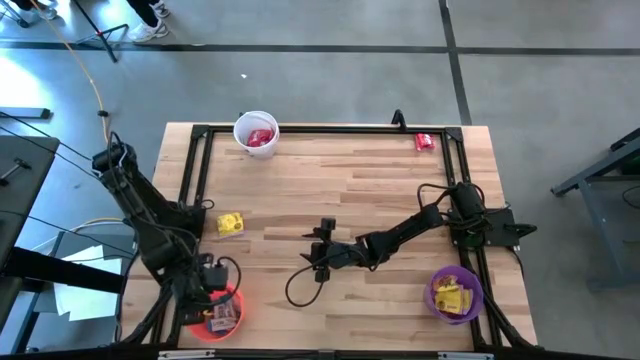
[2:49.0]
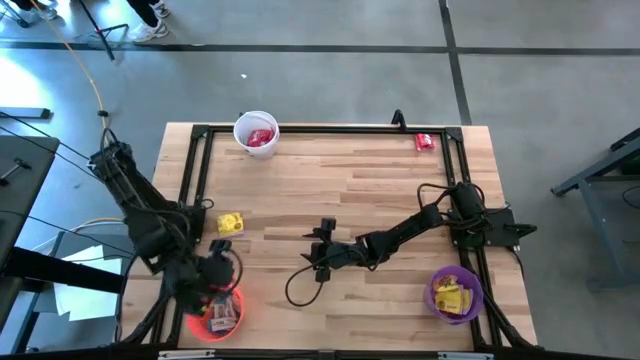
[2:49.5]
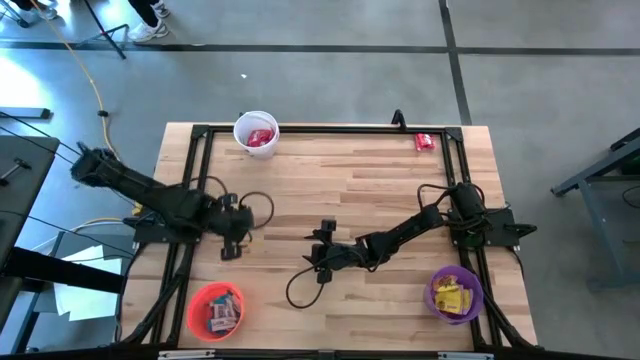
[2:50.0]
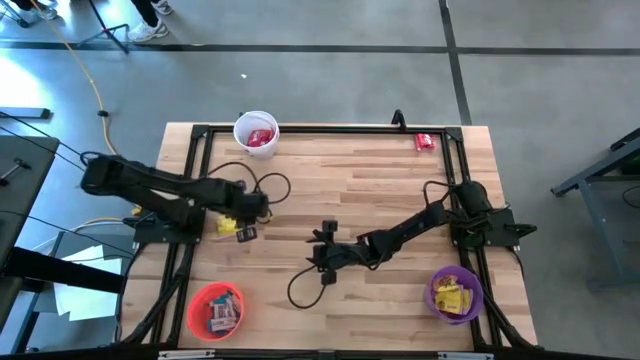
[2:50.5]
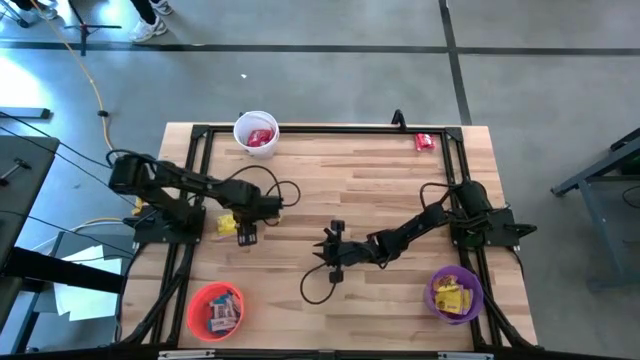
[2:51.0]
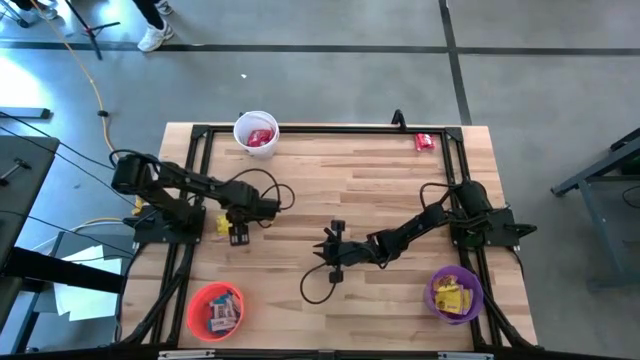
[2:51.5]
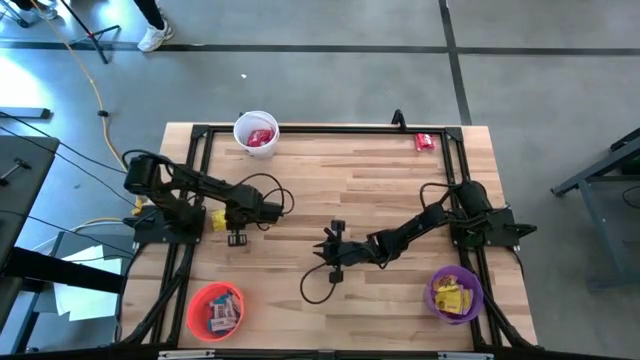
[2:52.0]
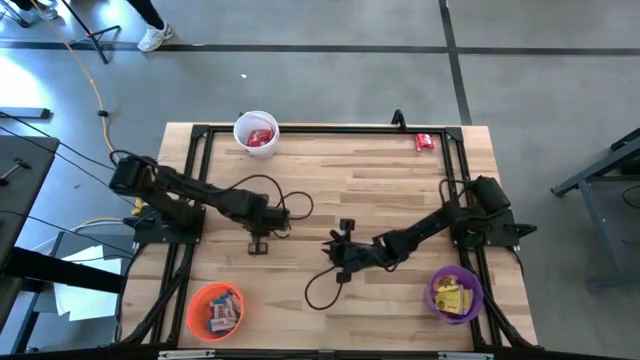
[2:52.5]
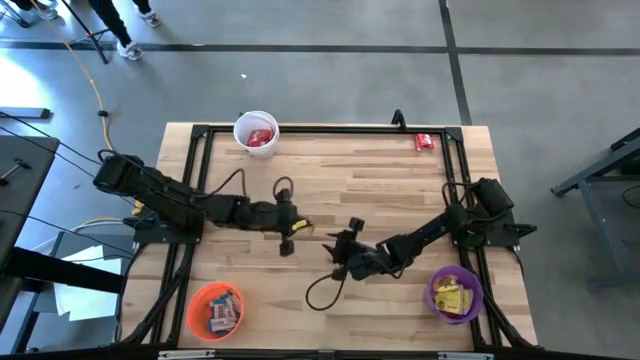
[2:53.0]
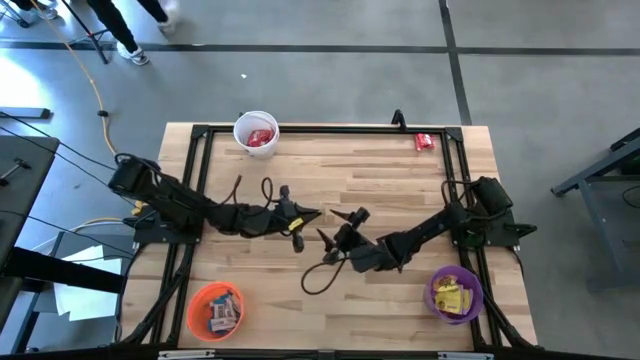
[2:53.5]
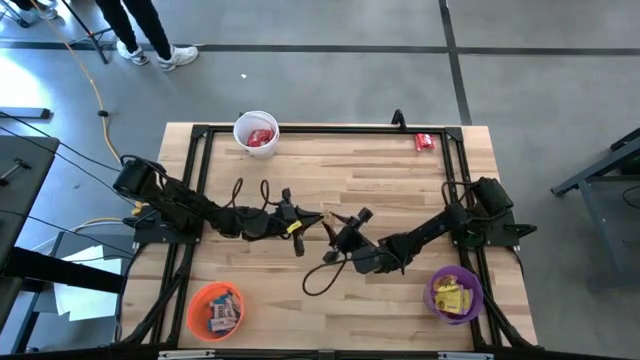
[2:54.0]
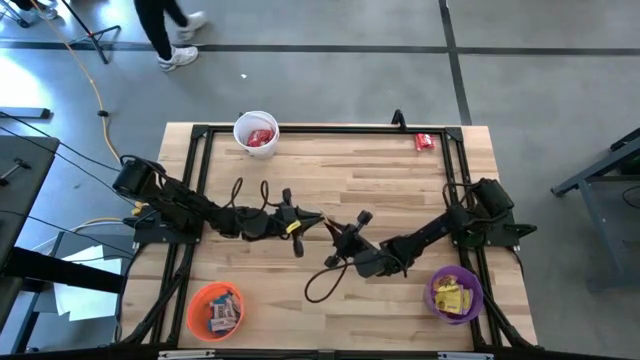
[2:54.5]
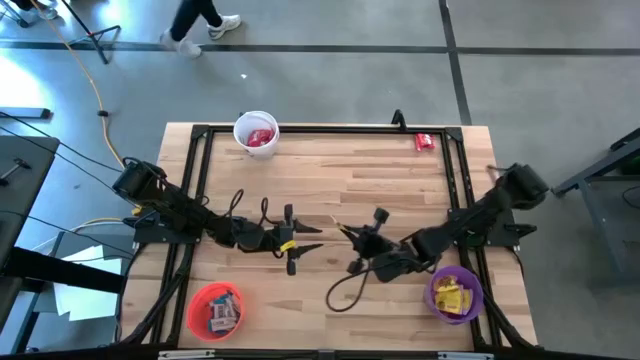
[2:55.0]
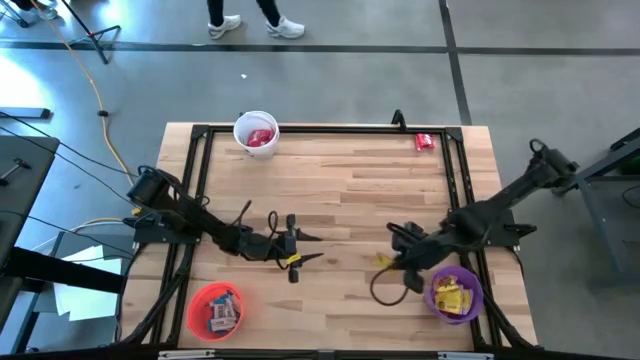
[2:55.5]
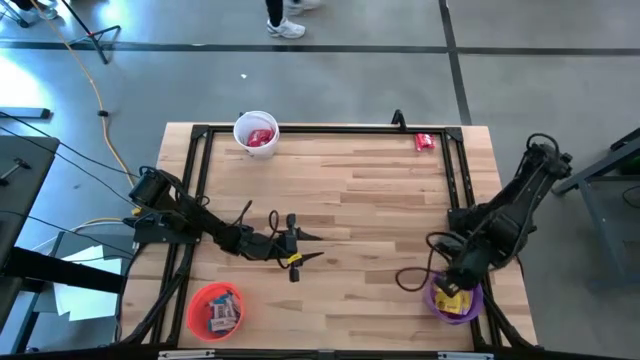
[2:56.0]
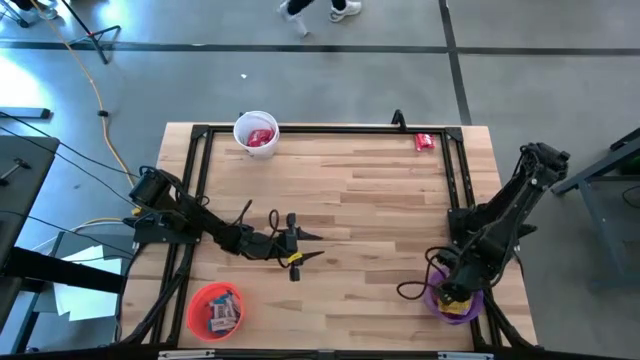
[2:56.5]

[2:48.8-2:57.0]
Task: Sort candy
Put the yellow candy into the purple bucket

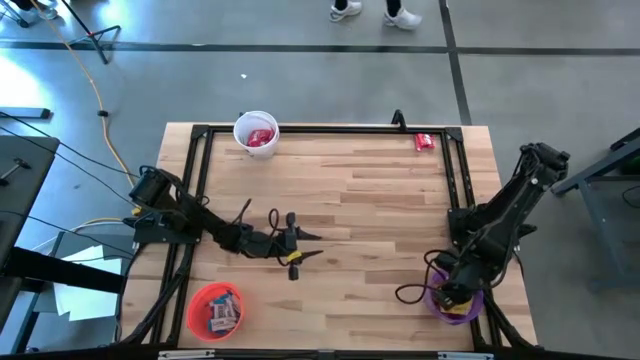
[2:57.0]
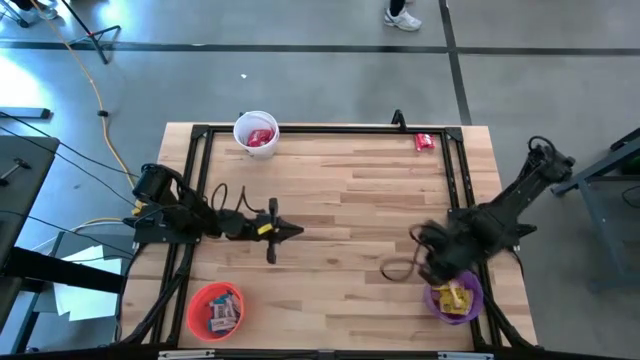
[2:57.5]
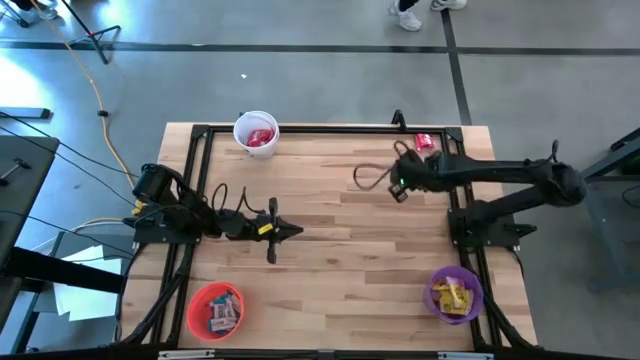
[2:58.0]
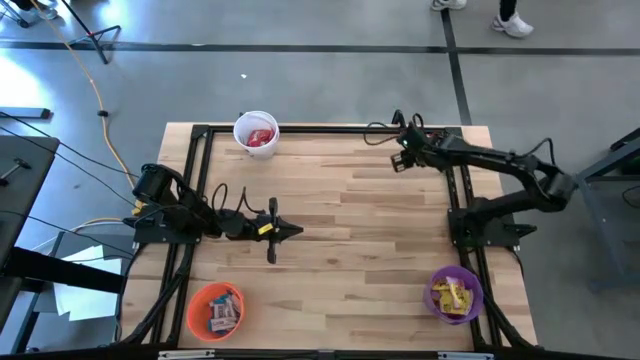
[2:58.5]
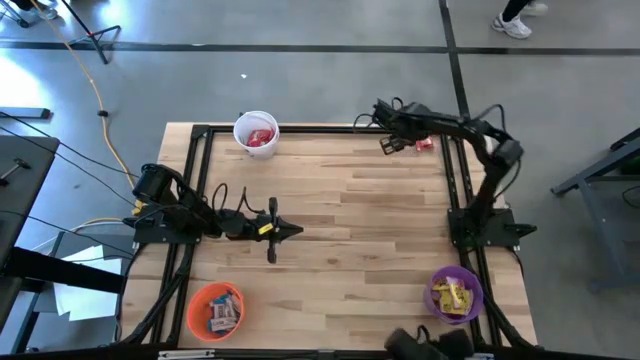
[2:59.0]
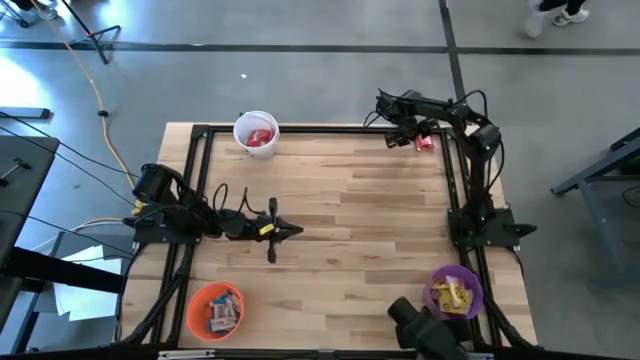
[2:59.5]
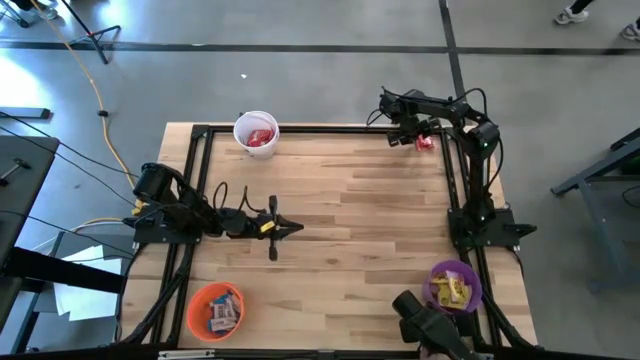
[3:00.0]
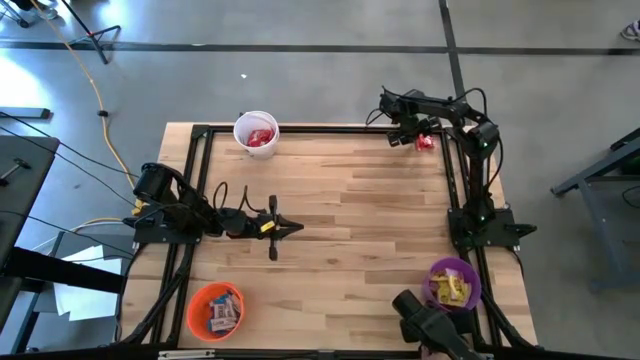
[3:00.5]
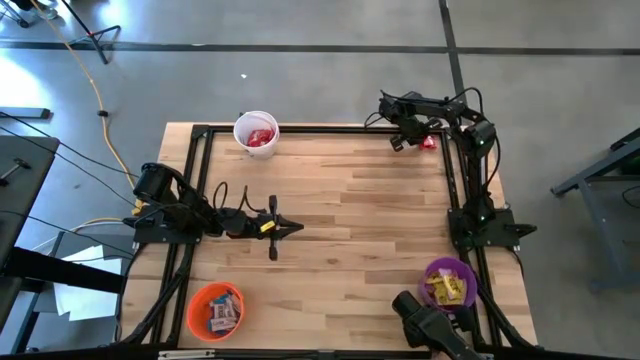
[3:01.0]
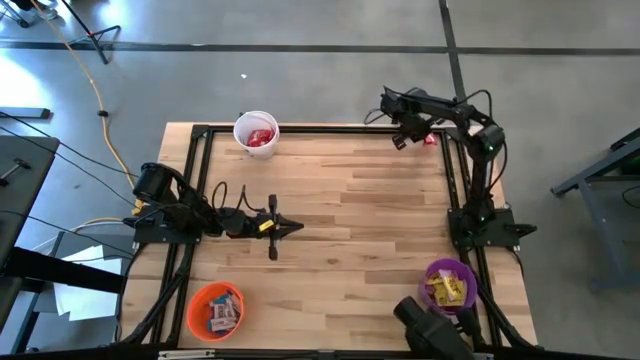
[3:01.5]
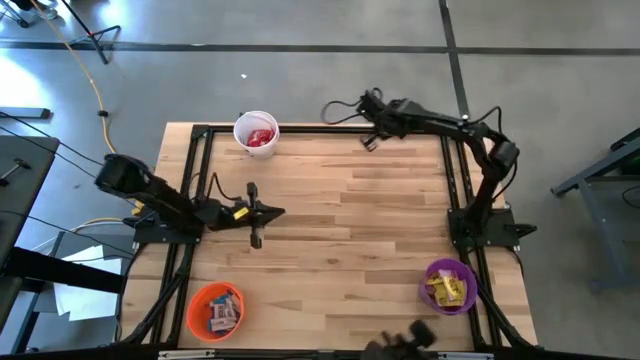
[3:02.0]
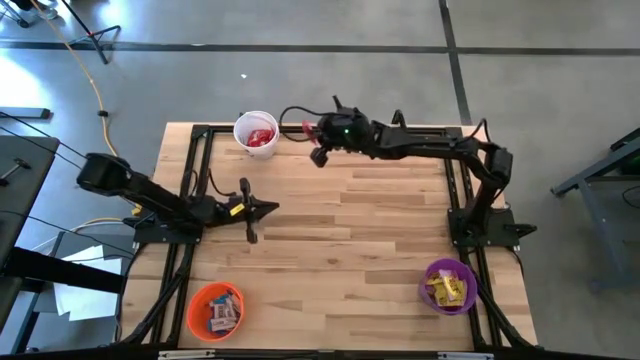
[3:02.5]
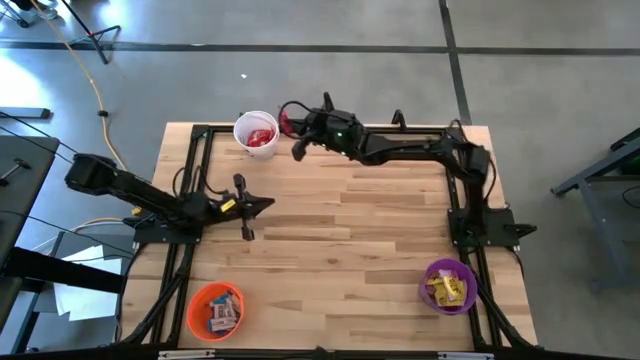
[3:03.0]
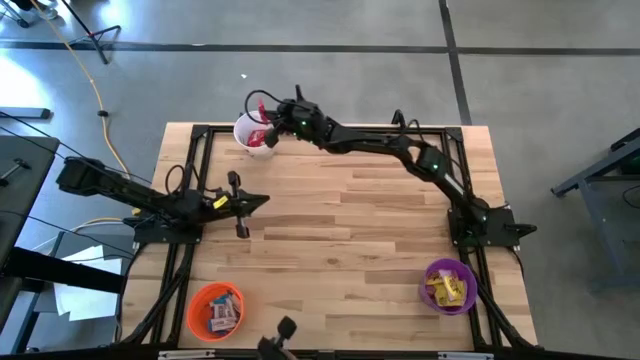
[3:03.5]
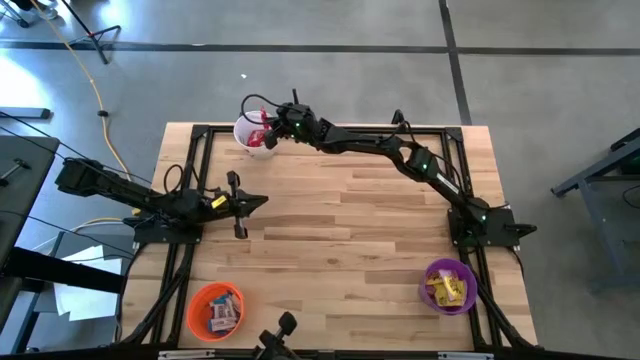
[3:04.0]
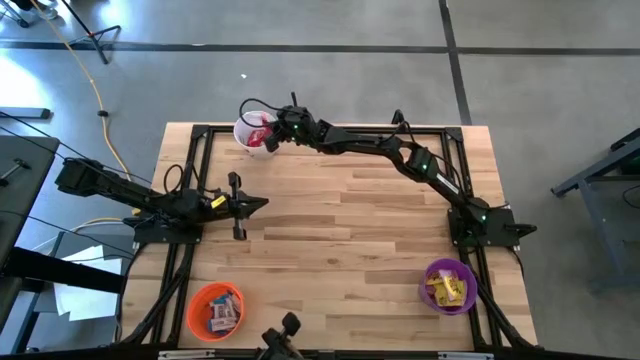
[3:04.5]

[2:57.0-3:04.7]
Put the red candy into the white bucket

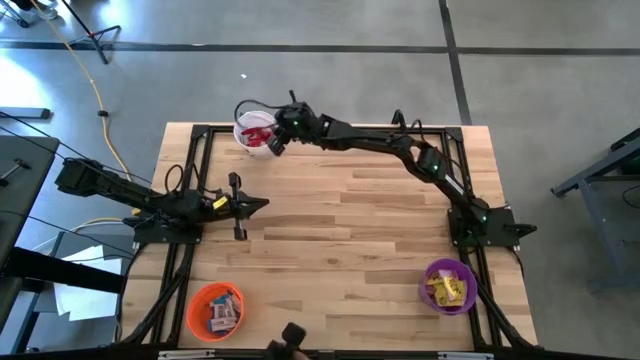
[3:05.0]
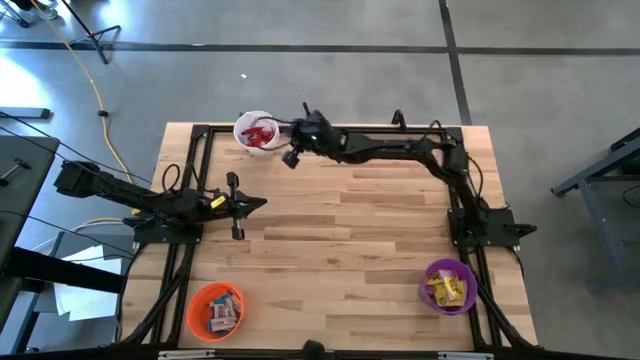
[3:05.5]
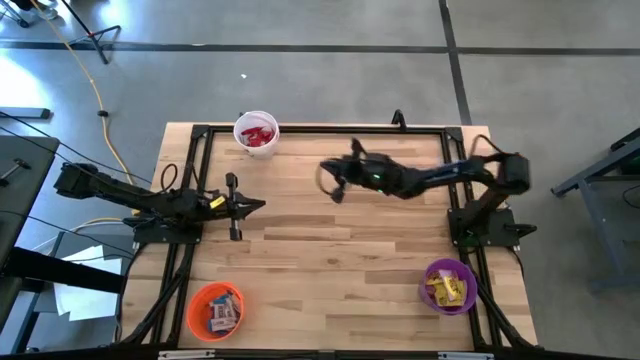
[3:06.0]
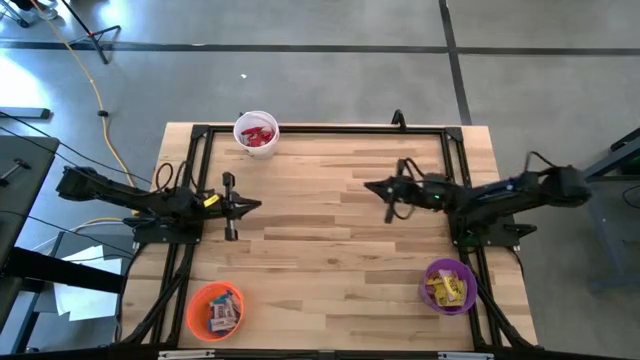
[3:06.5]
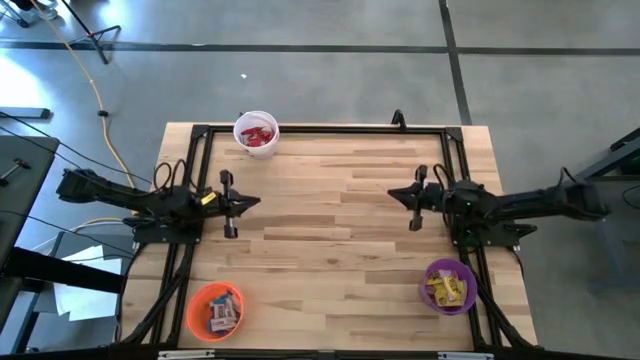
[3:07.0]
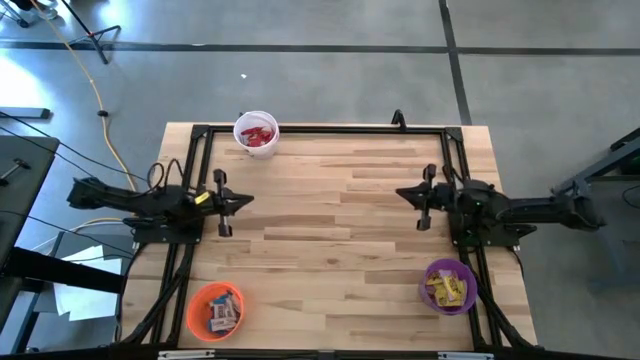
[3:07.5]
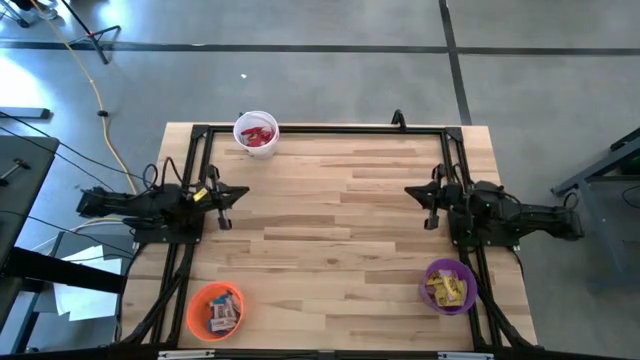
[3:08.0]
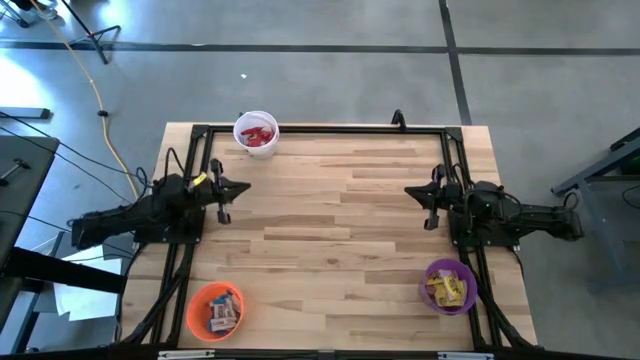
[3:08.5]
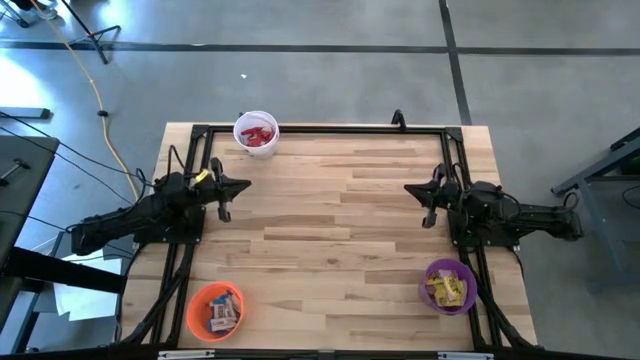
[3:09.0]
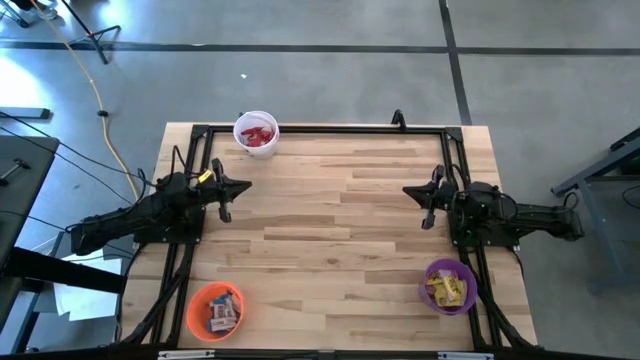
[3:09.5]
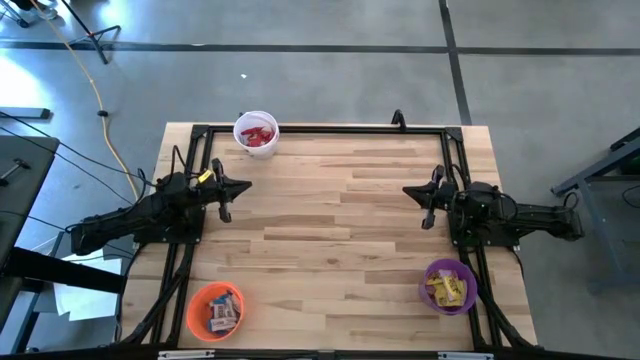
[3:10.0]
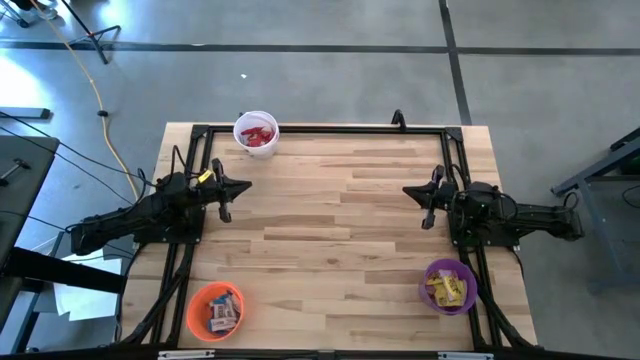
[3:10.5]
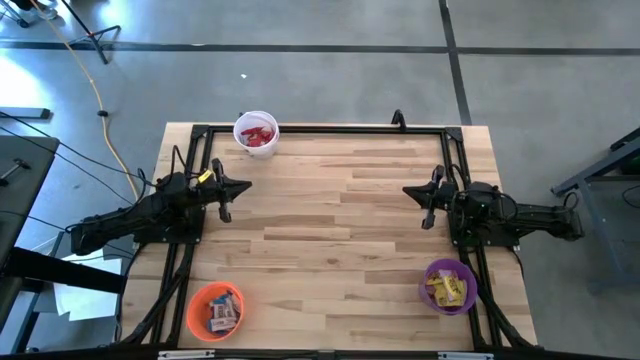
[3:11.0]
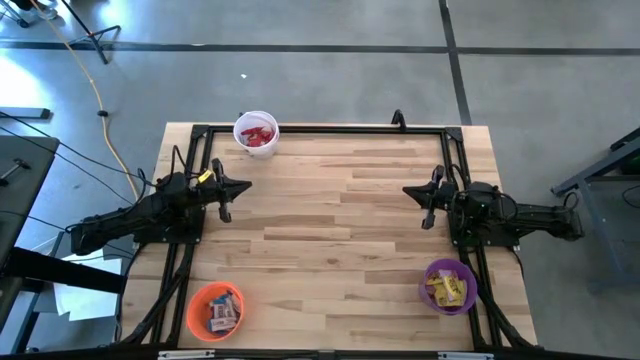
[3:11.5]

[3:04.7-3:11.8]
Return to Home Position
